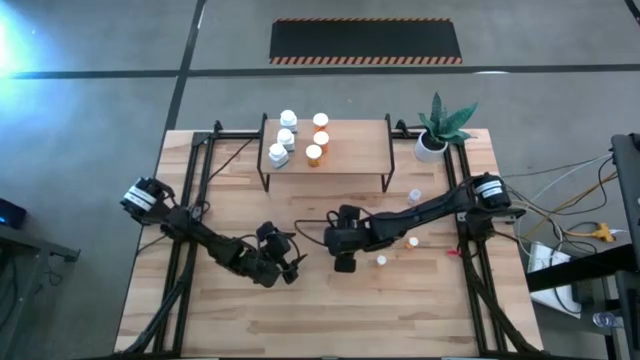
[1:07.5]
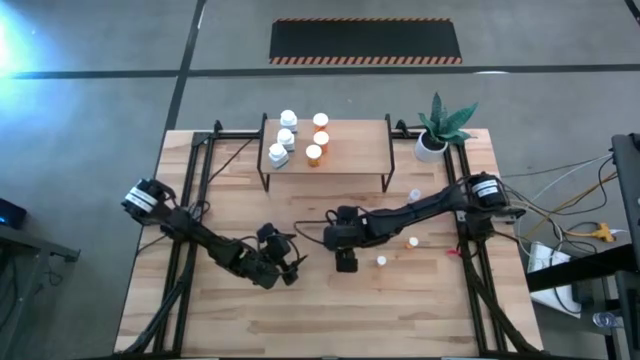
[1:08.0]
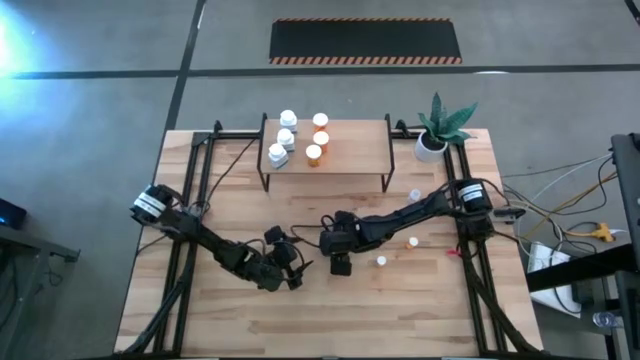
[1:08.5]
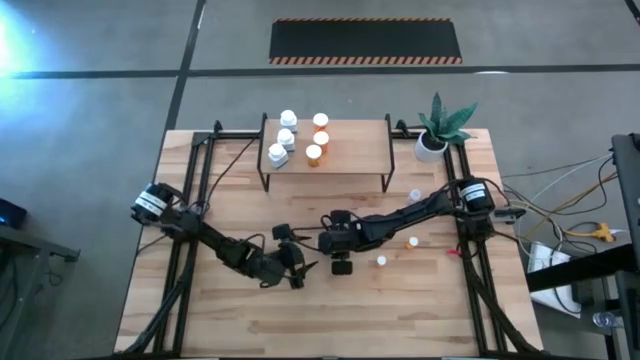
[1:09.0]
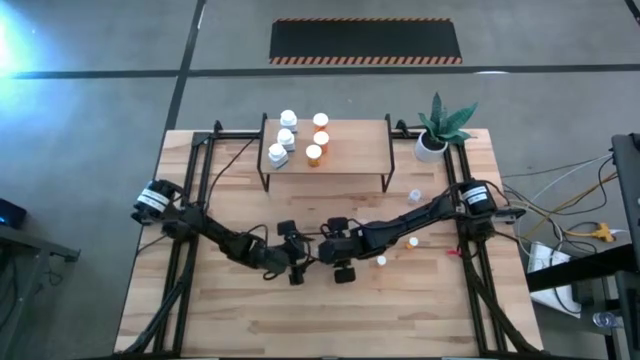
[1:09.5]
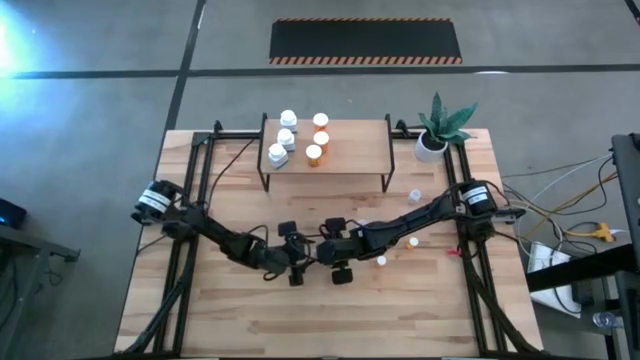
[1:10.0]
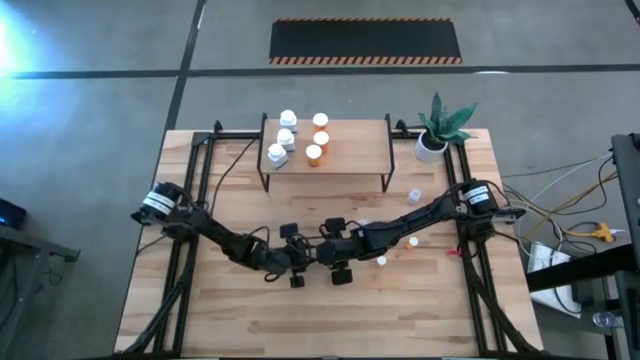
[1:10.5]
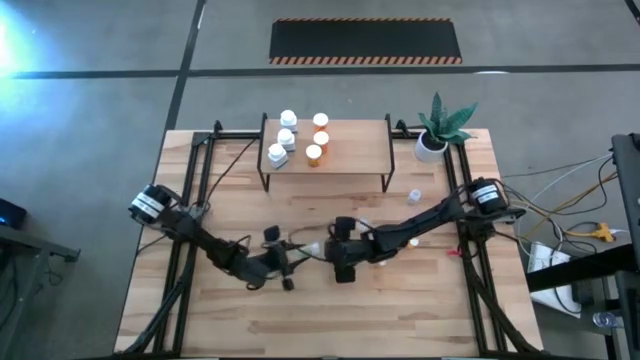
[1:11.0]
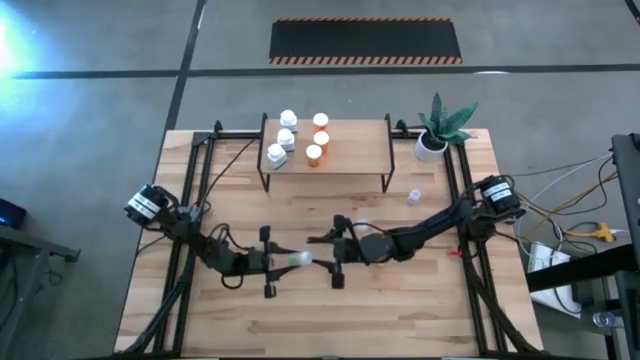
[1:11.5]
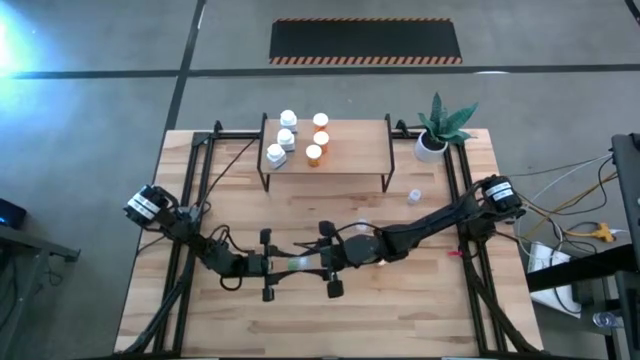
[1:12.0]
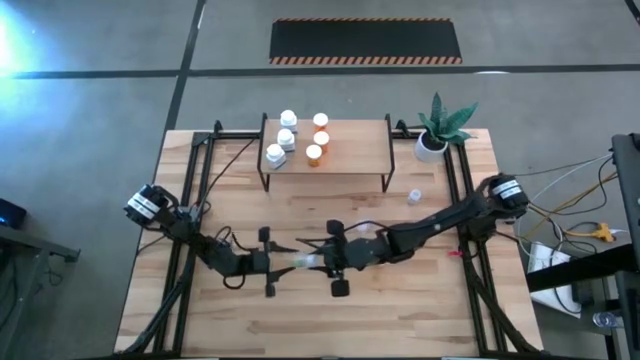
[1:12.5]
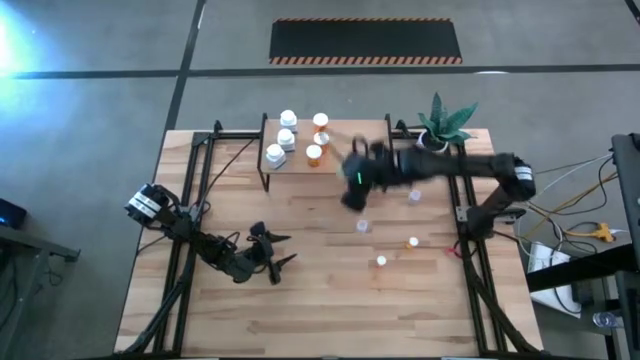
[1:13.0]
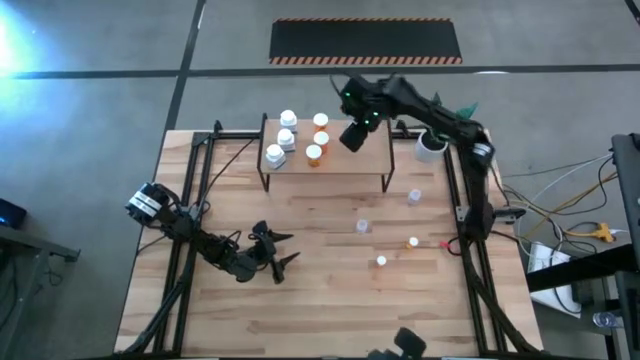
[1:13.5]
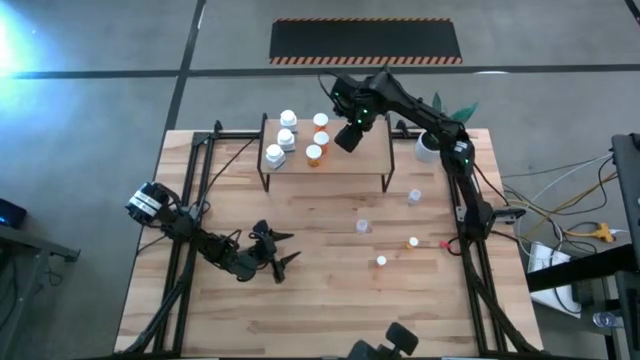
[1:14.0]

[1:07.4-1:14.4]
Task: Pick and place medicine bottles onto shelf by color
Put the bottom left transparent pill bottle on the shelf

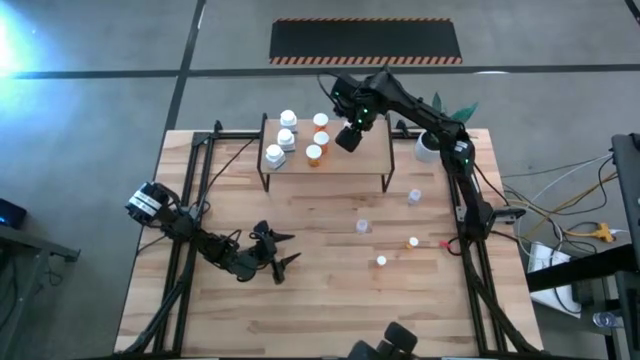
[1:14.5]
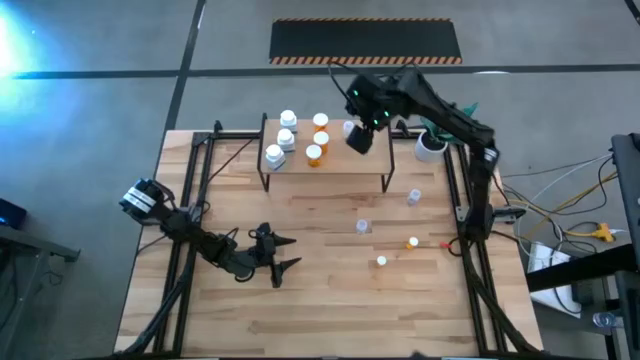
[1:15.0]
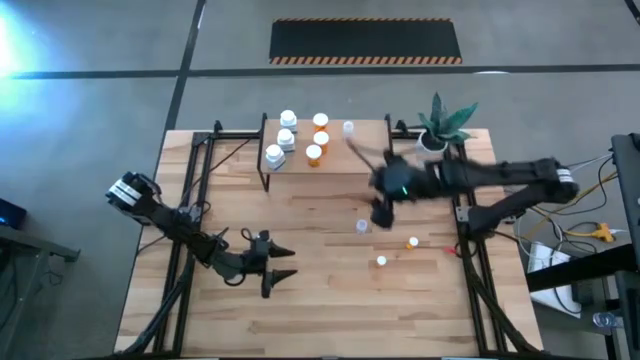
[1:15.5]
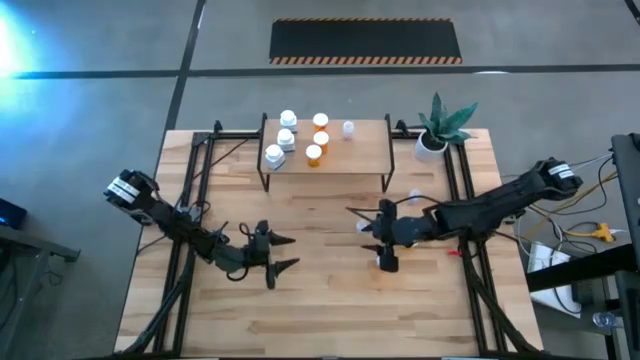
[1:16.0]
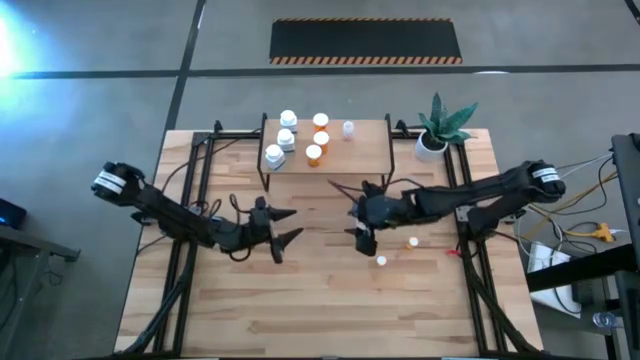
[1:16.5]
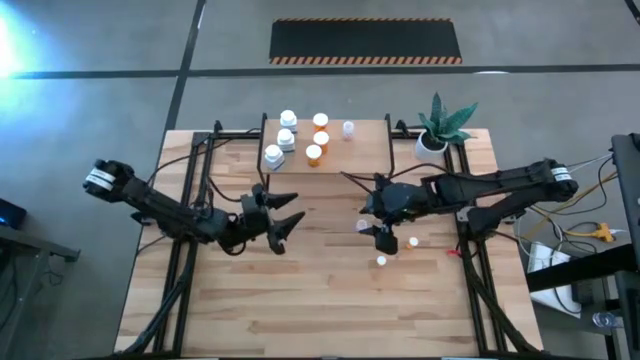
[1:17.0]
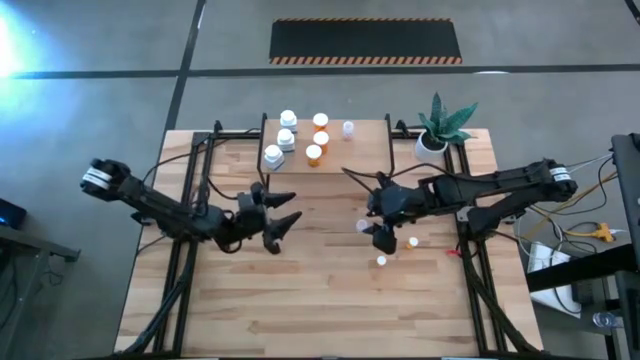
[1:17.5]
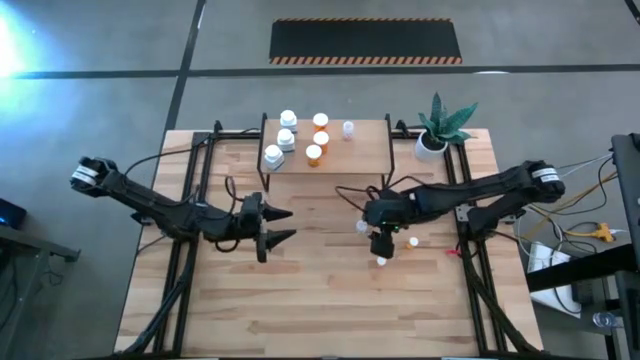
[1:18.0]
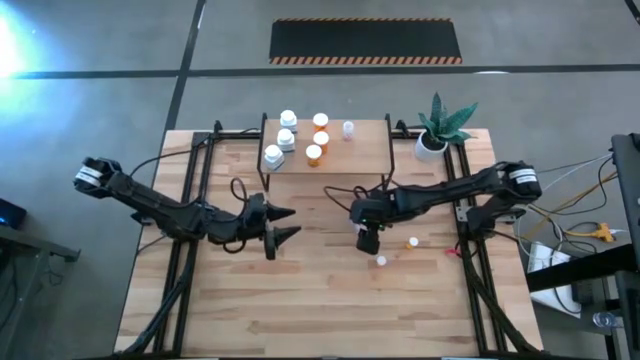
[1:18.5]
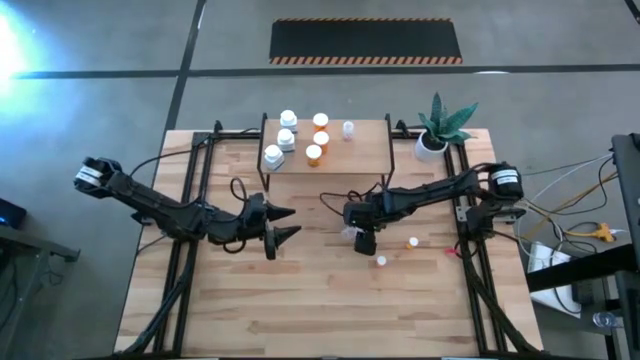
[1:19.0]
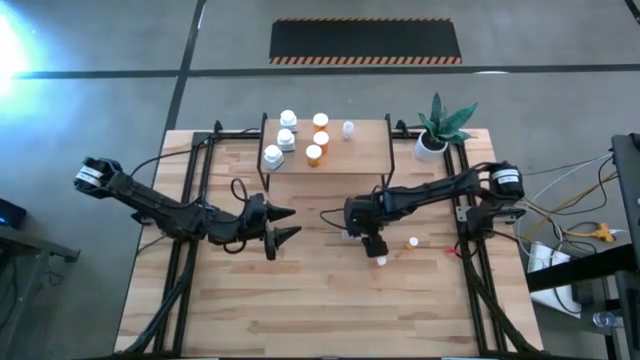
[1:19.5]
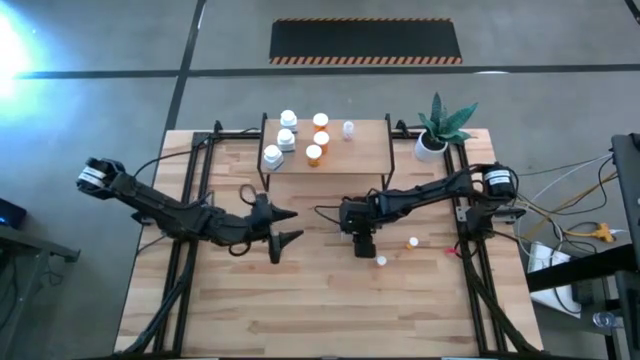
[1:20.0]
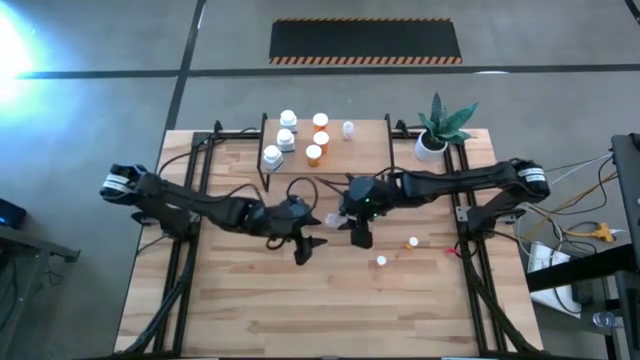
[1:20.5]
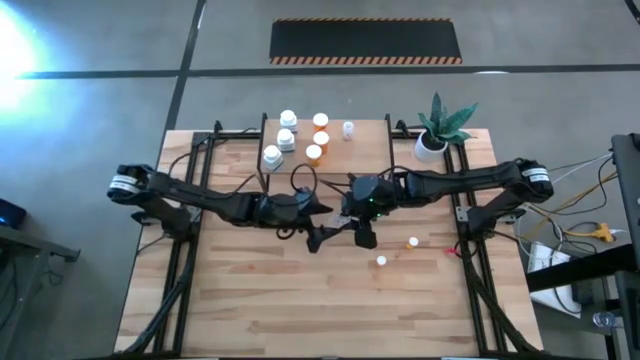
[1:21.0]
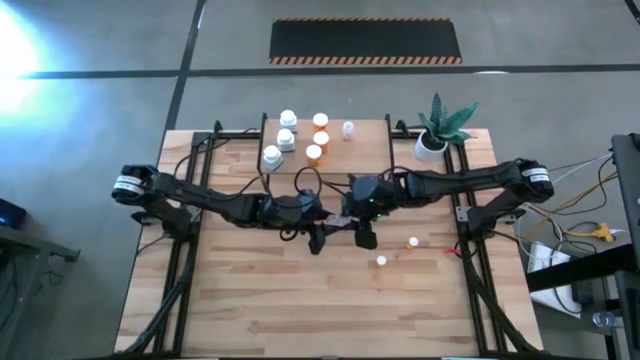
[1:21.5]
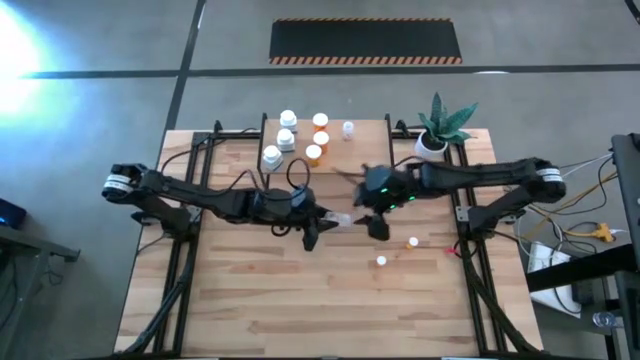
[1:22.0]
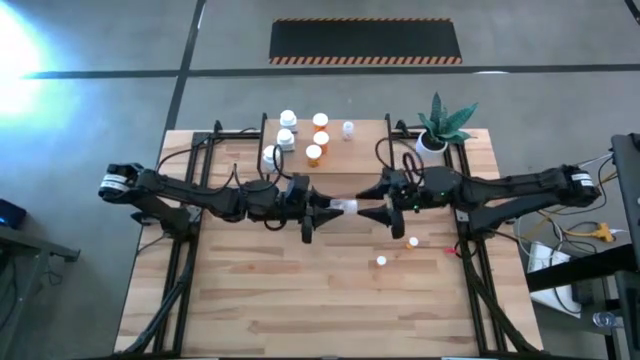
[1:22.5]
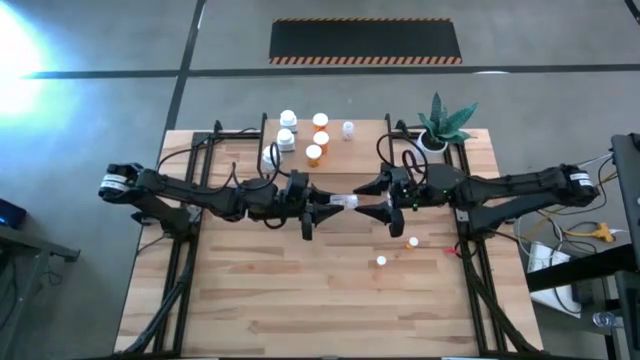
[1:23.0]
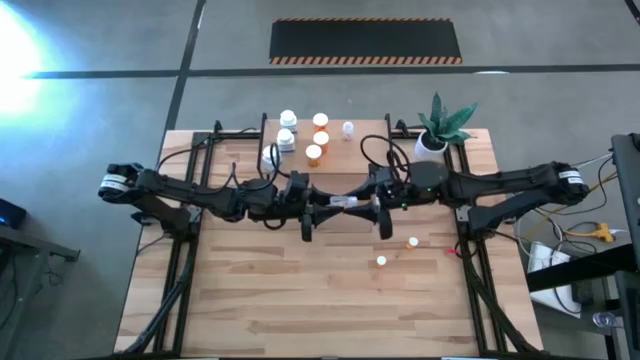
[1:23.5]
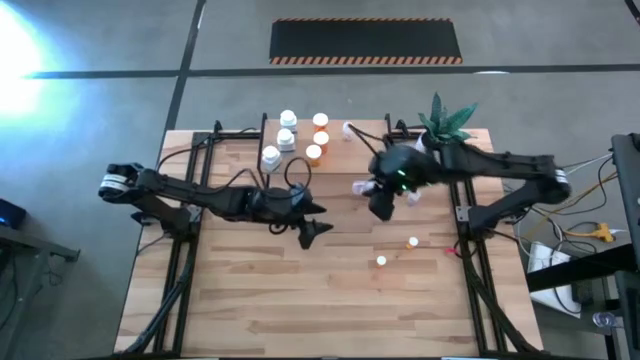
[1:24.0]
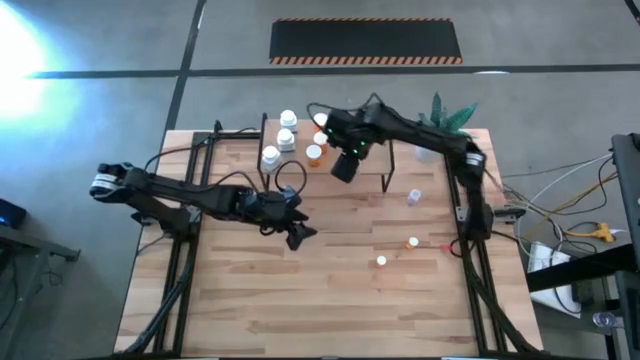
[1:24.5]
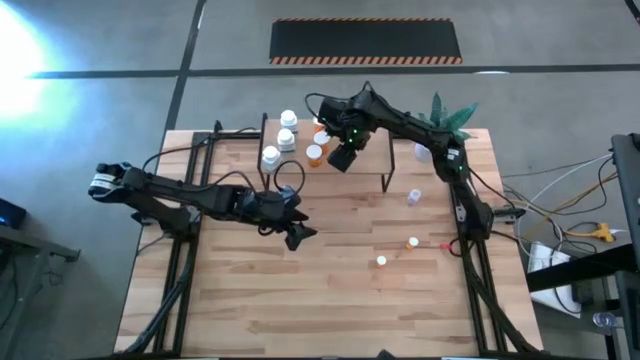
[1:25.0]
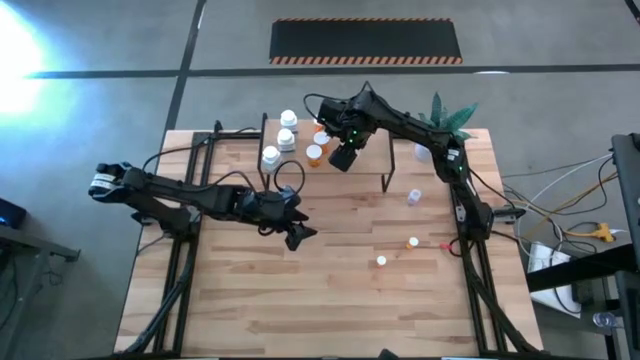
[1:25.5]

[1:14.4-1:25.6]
Put the left transparent pill bottle on the shelf aligned with the other transparent pill bottle

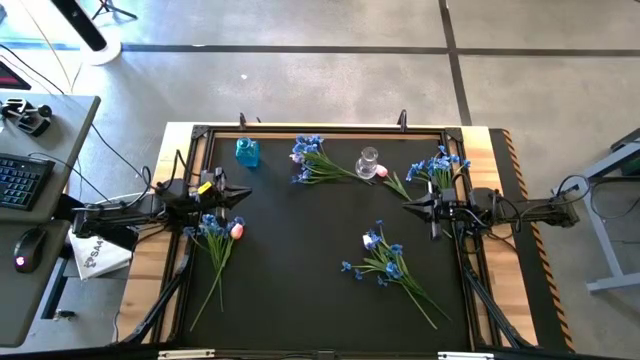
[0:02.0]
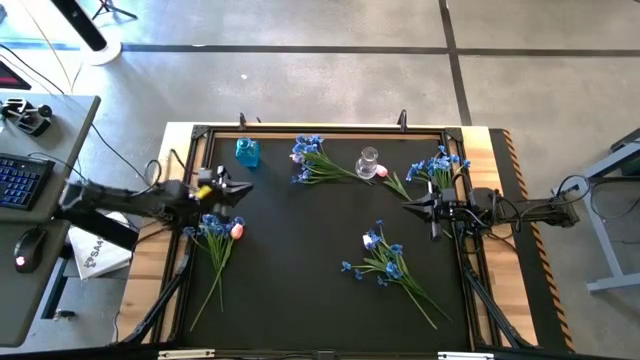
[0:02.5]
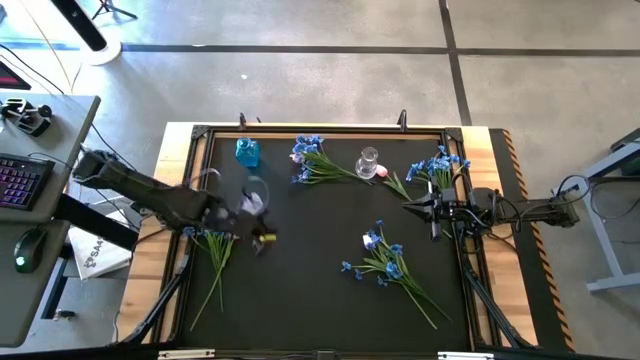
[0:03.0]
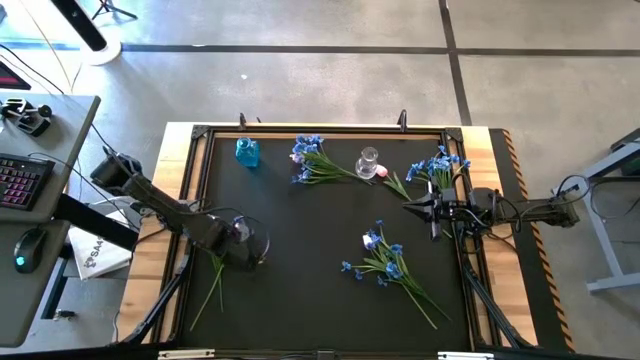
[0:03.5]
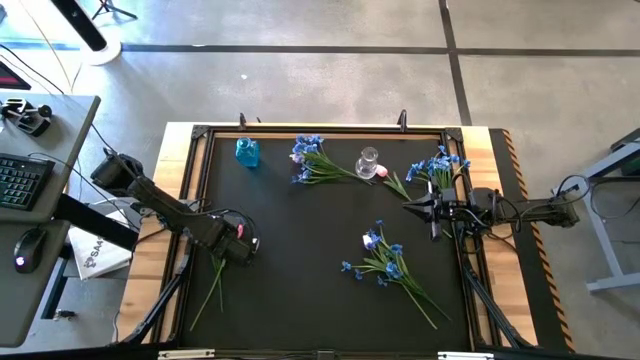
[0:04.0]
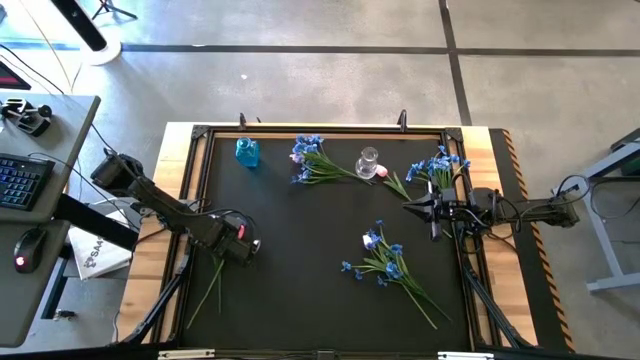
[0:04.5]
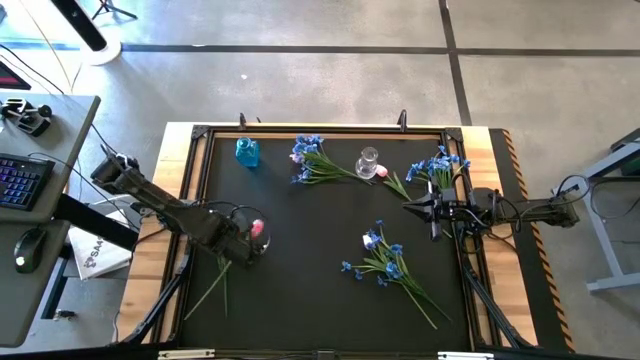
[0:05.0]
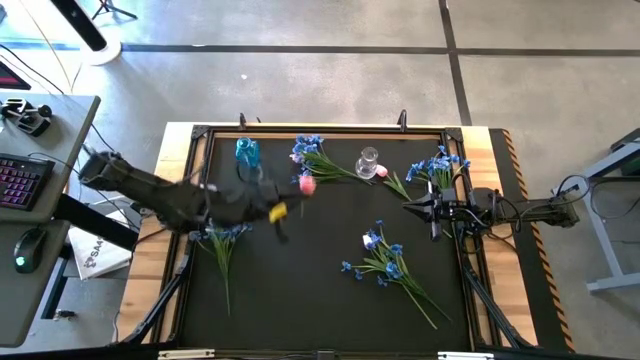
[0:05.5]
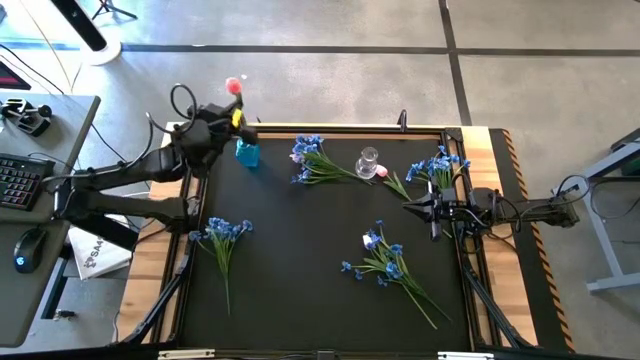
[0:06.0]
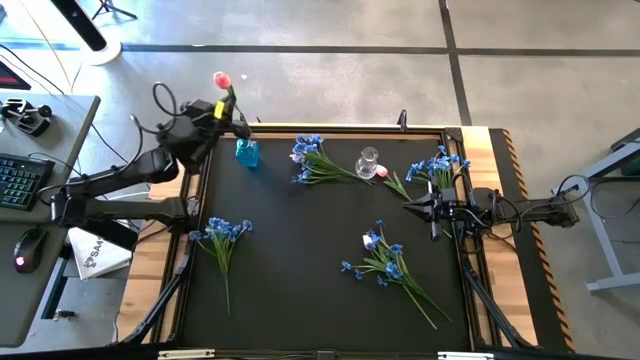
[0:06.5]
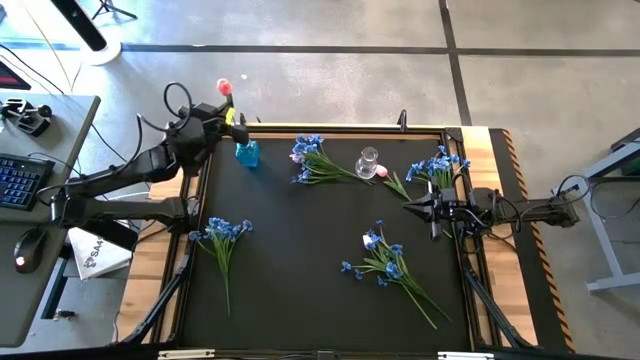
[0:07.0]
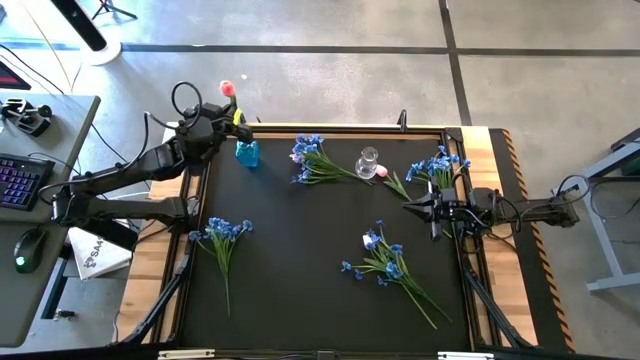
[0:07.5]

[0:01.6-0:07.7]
Task: Sort flowers into vase by color
Put the pink tulip flower into the blue flower vase
